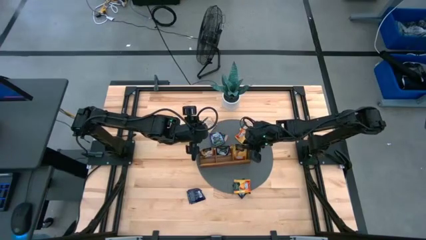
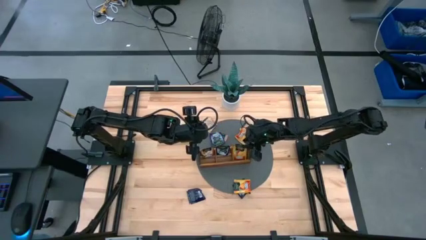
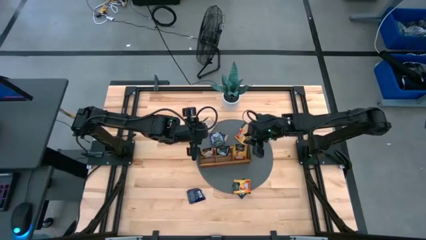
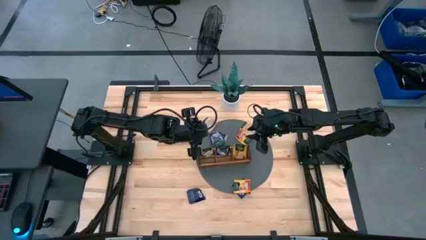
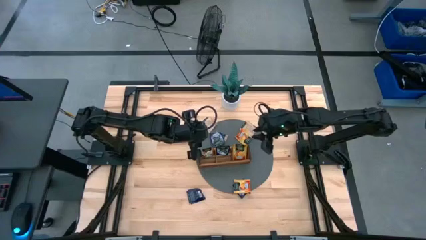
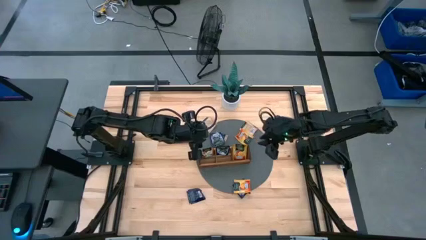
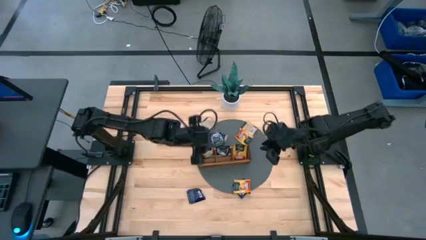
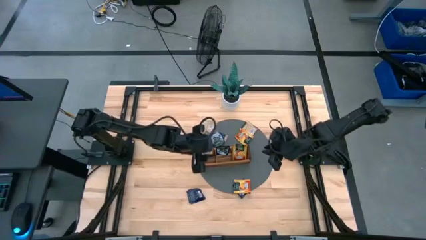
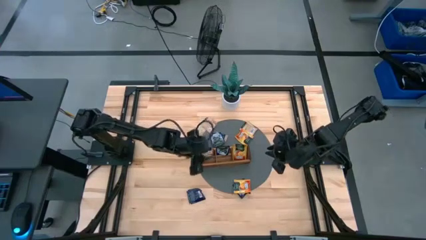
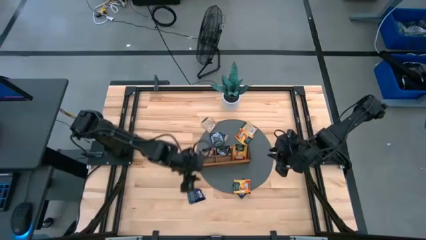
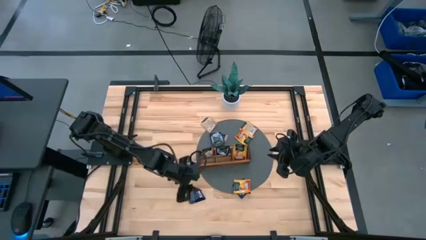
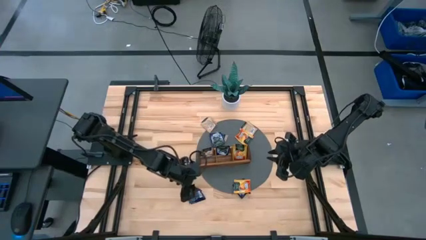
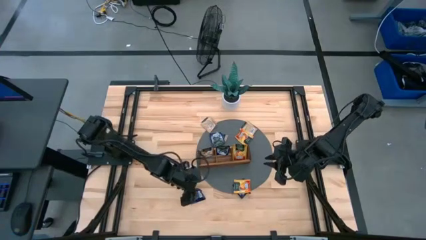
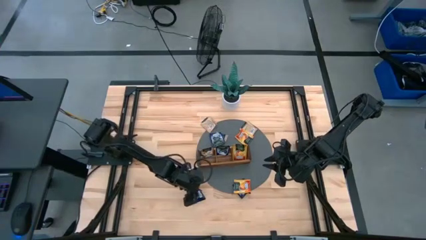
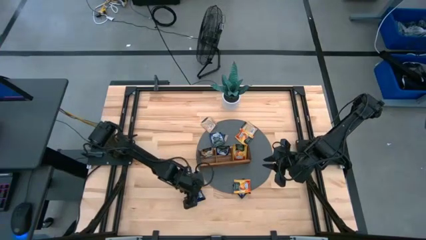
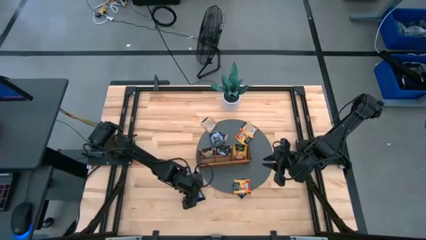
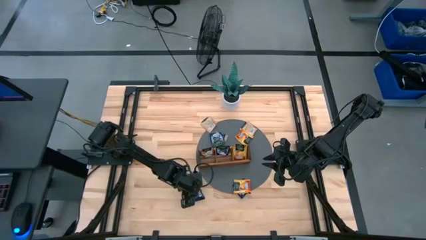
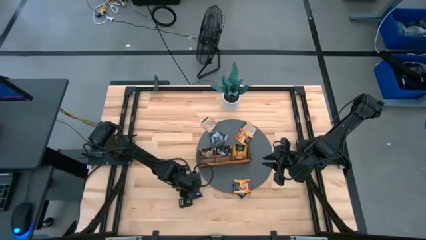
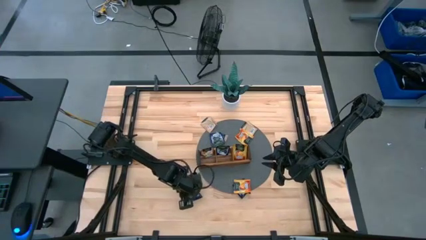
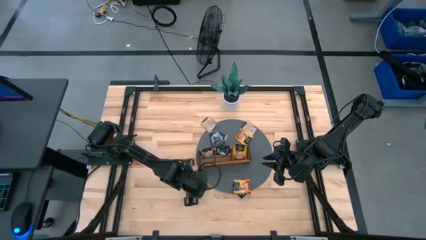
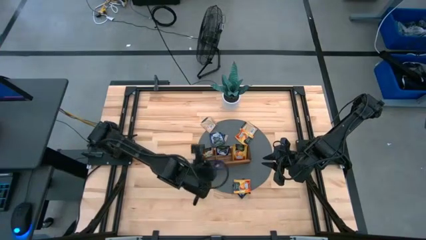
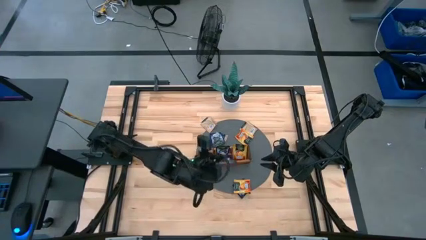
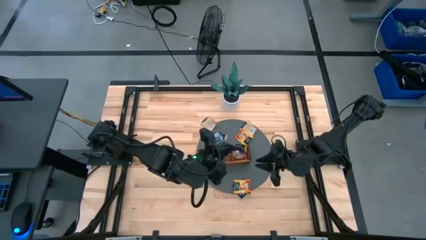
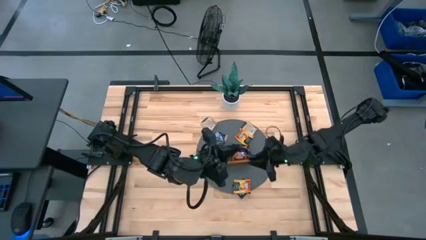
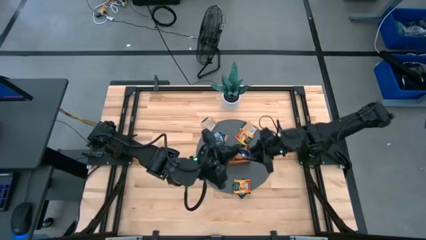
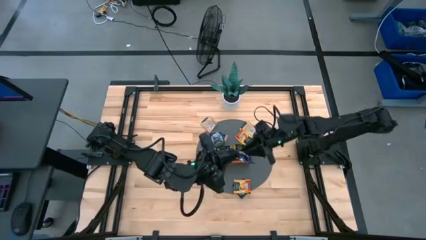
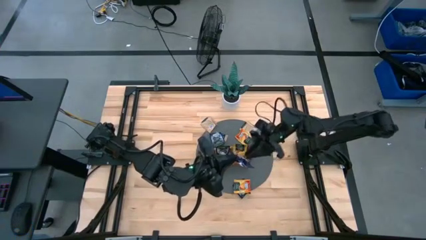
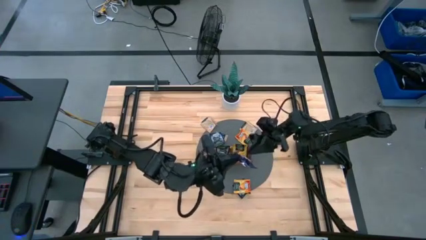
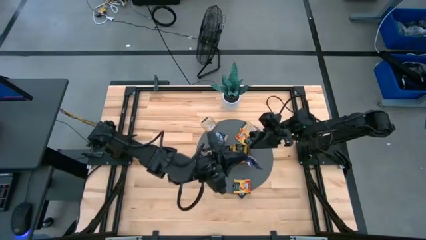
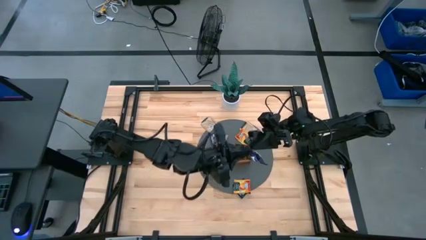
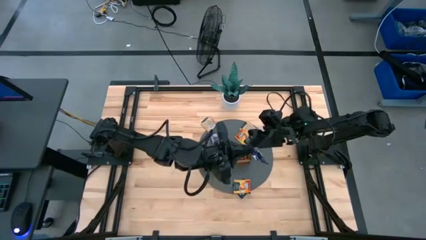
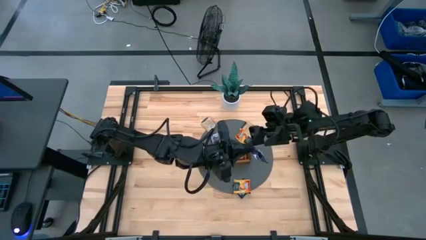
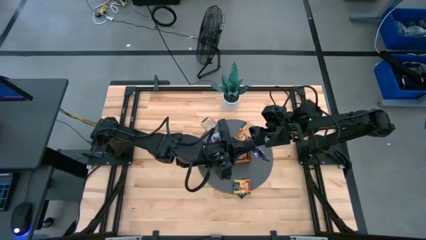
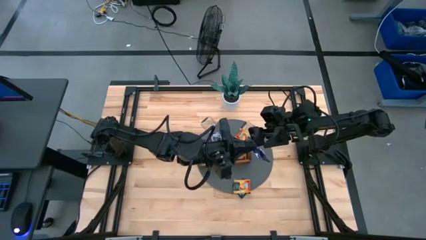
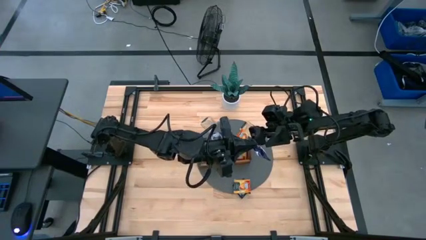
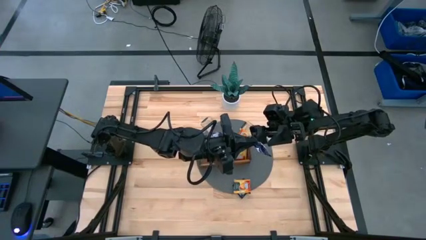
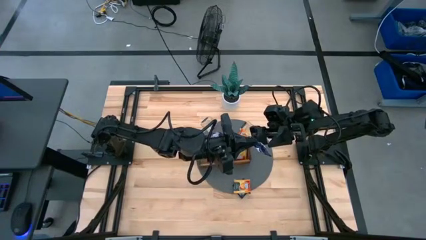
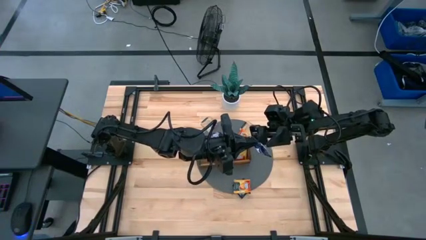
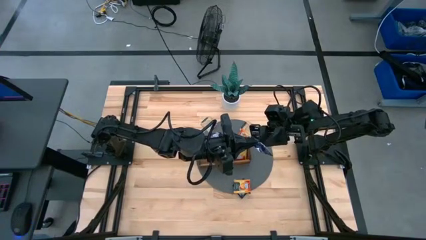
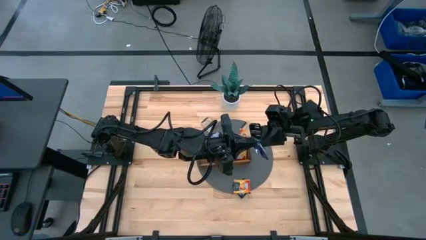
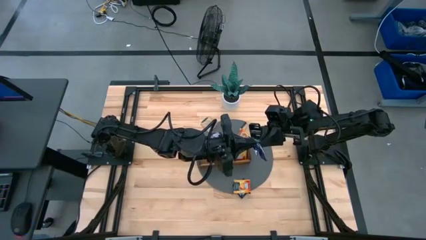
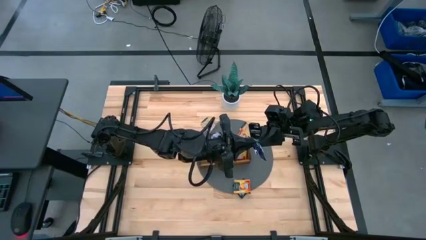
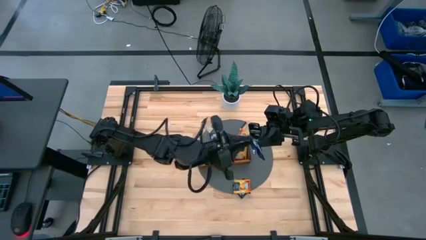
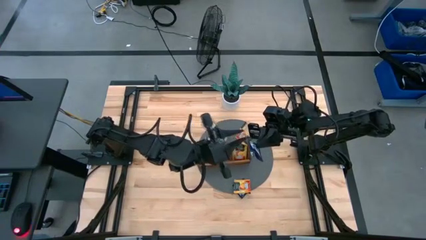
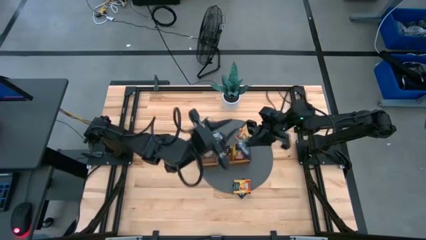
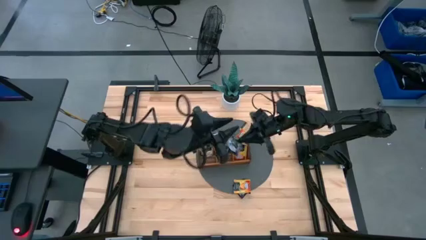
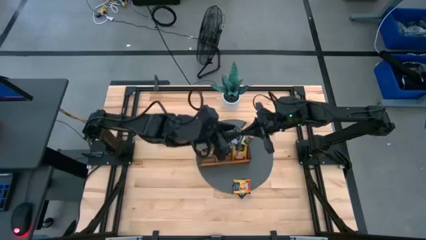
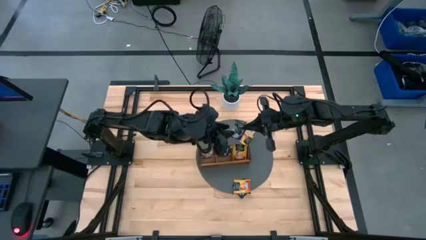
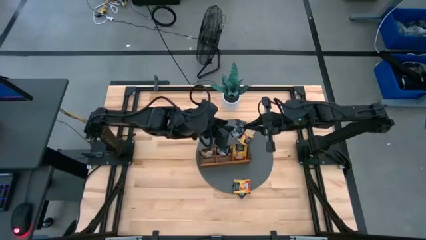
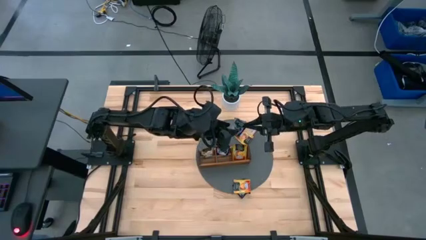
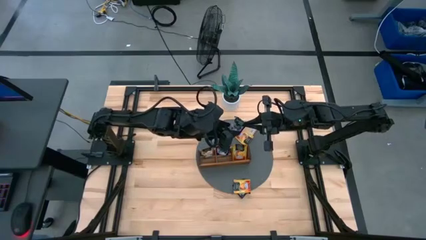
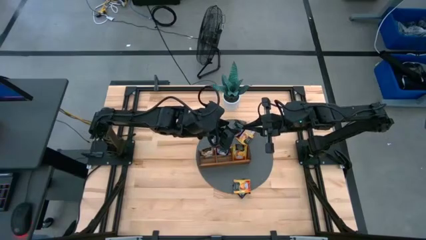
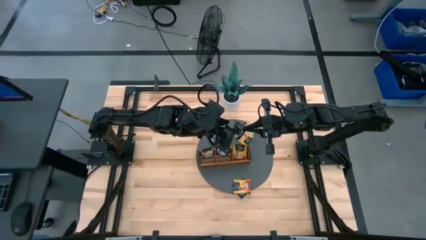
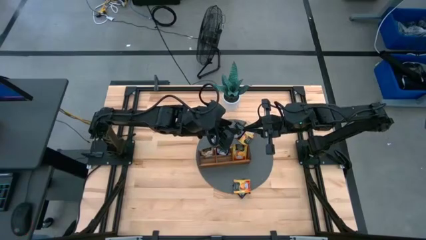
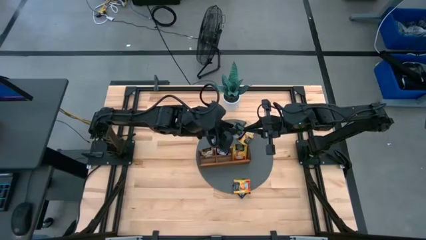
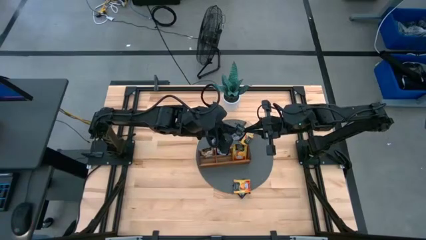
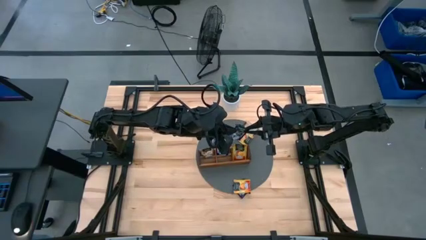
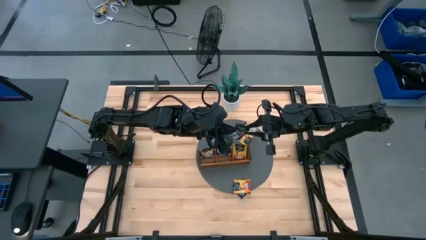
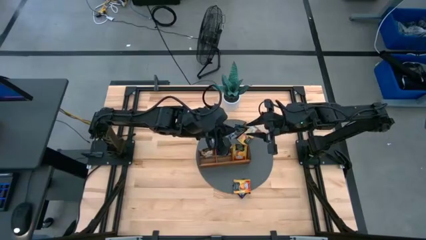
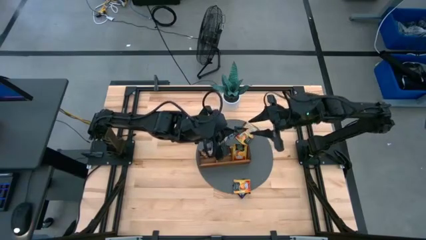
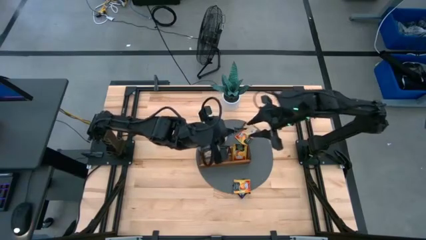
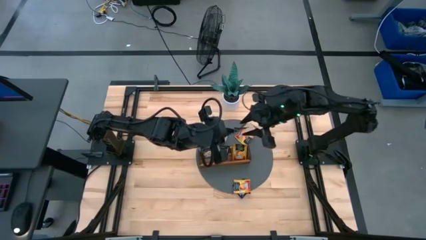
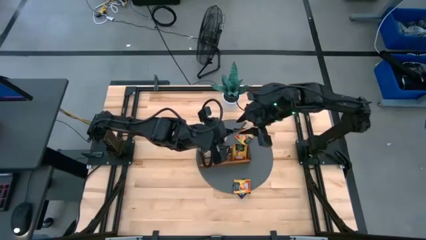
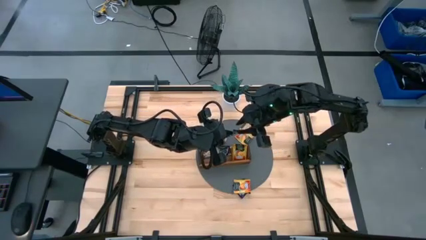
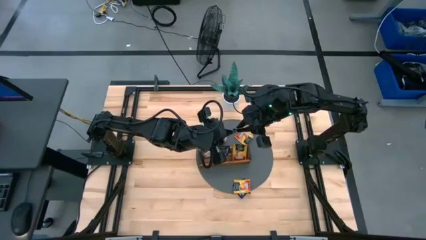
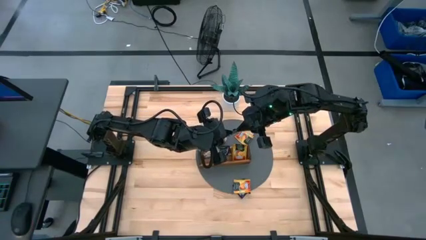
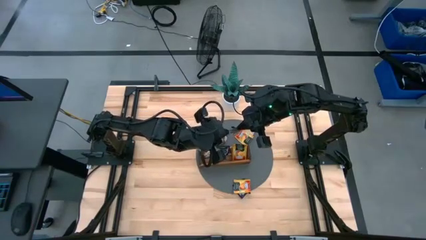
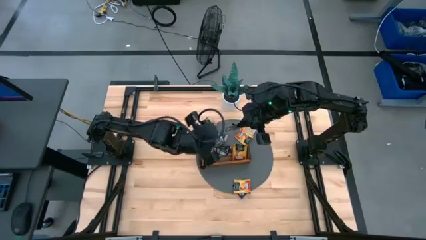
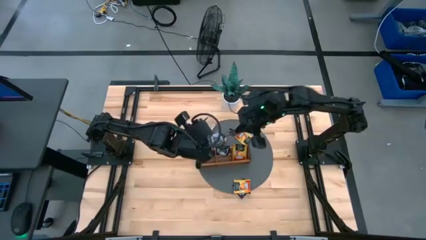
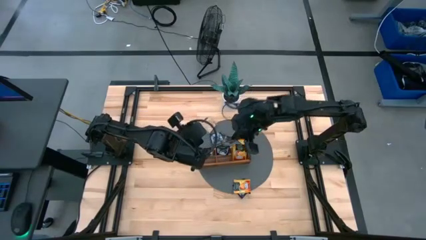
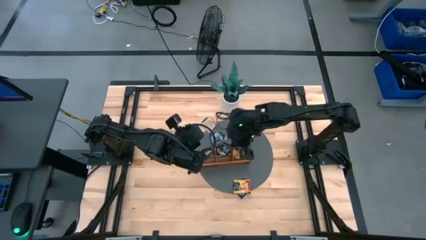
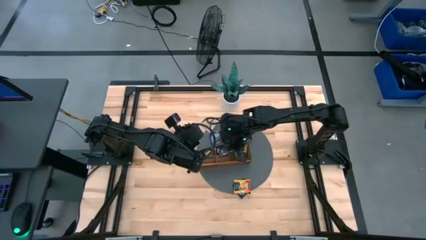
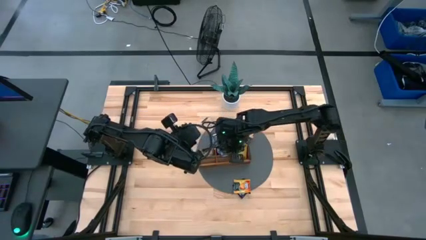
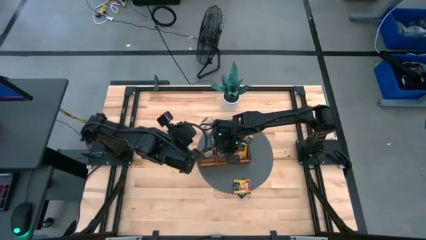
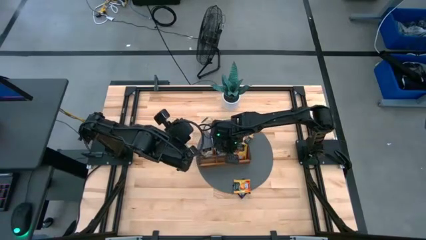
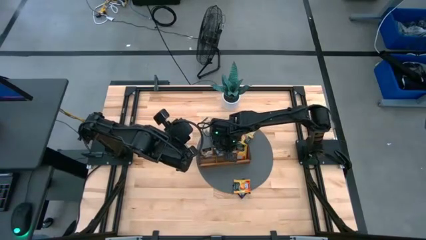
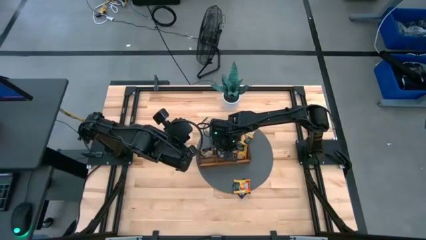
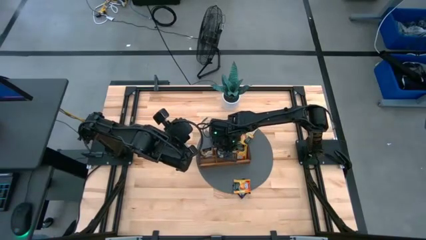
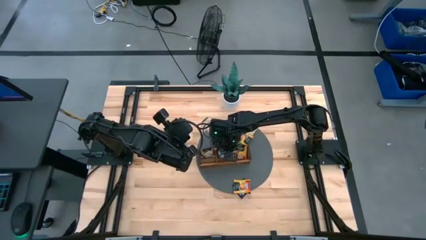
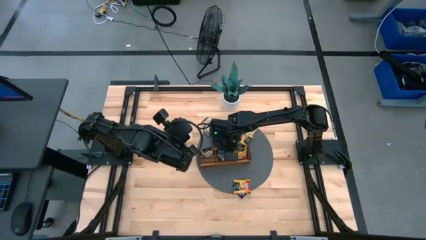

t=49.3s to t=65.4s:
Task: Pick & Place Tea
Put the black tea bag into the middle section of the wooden organizer
